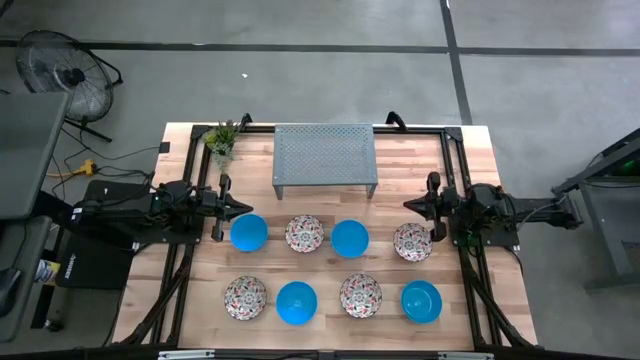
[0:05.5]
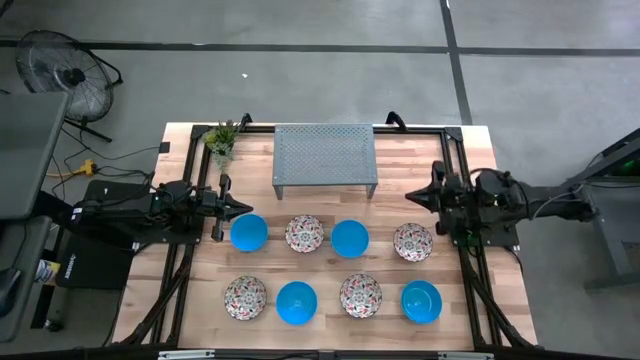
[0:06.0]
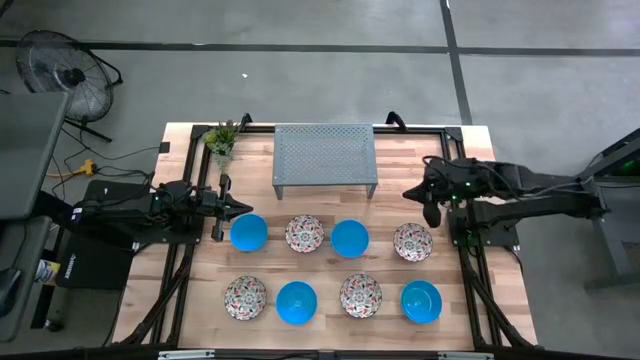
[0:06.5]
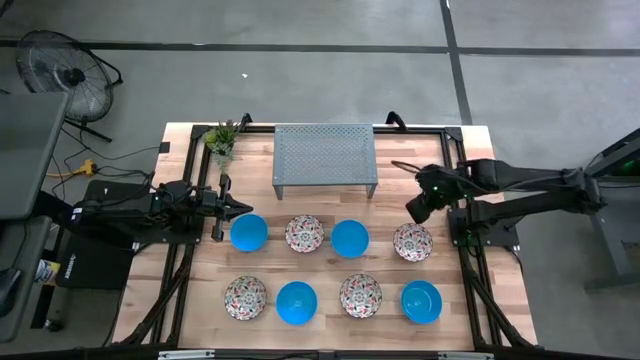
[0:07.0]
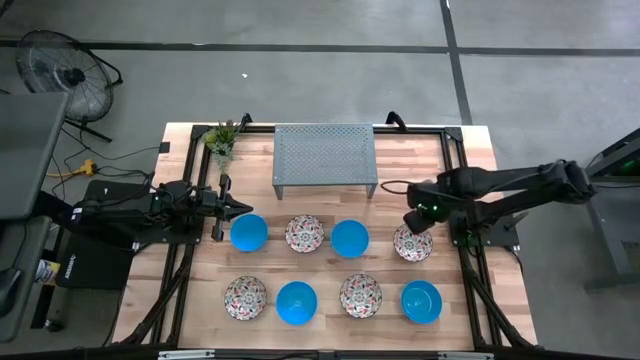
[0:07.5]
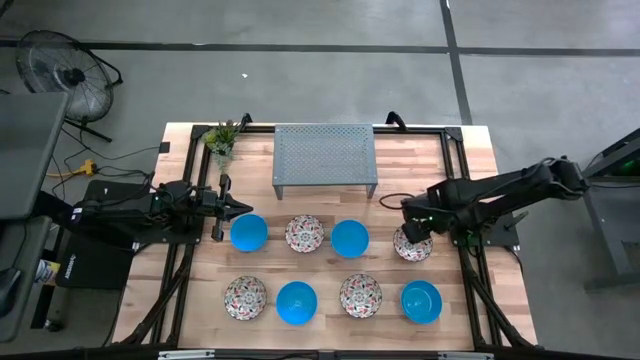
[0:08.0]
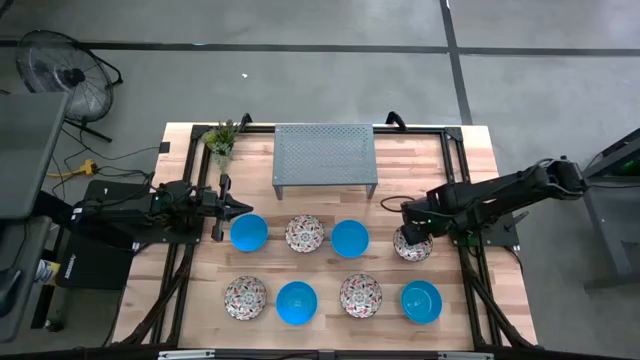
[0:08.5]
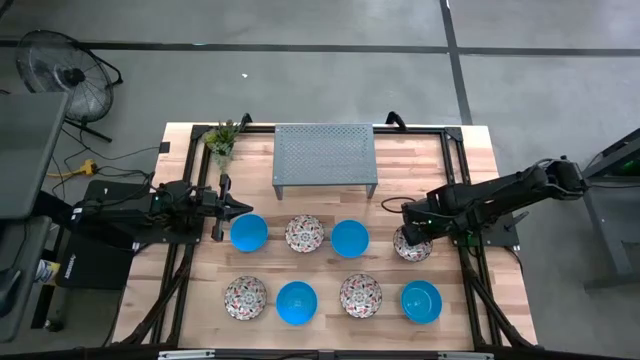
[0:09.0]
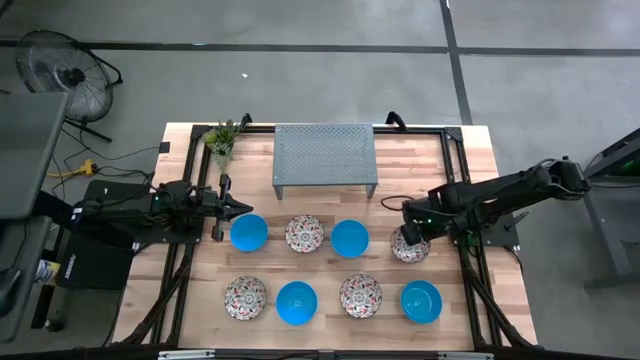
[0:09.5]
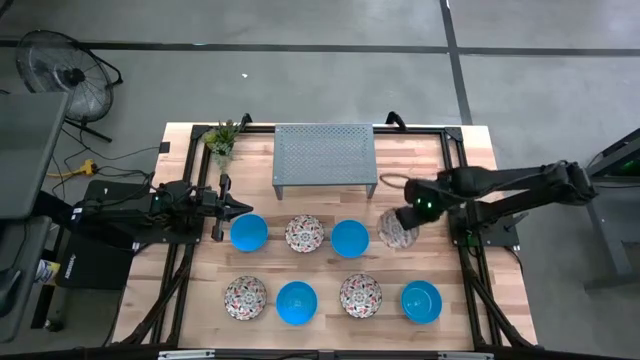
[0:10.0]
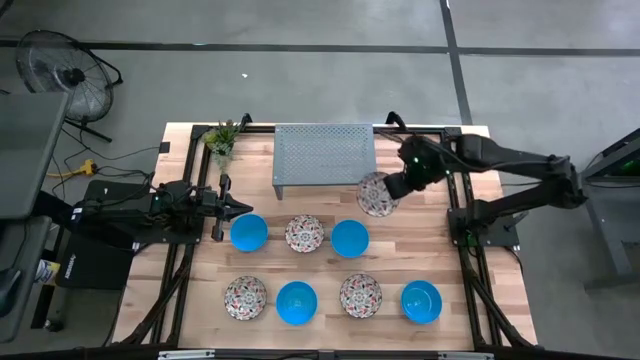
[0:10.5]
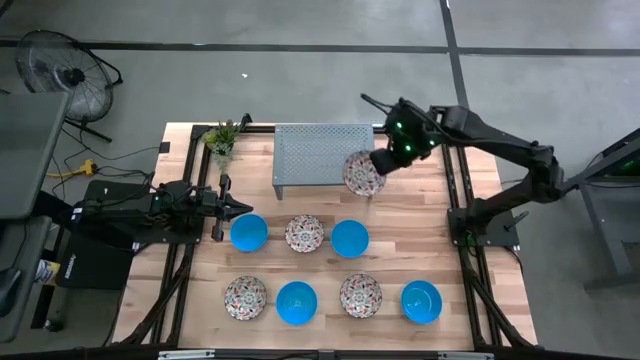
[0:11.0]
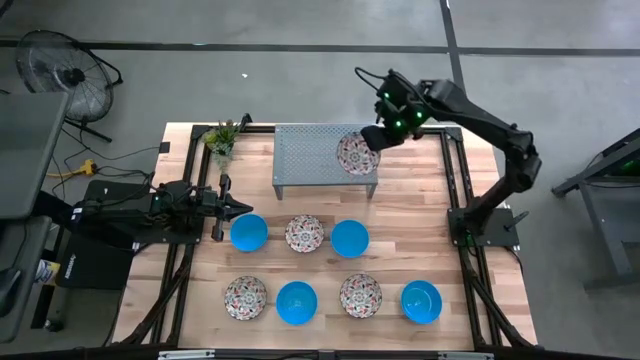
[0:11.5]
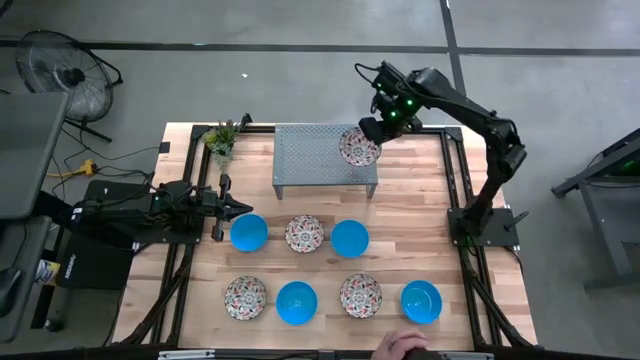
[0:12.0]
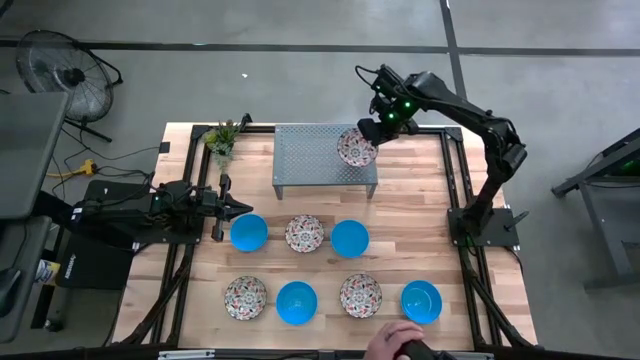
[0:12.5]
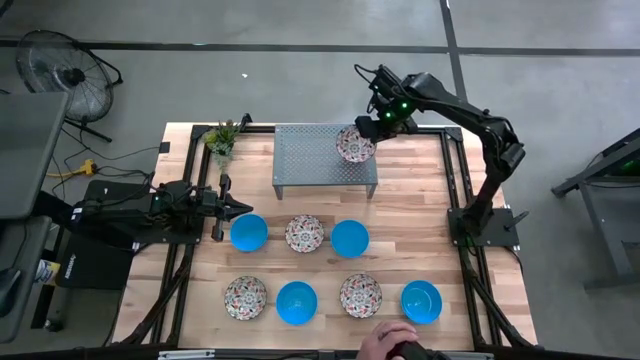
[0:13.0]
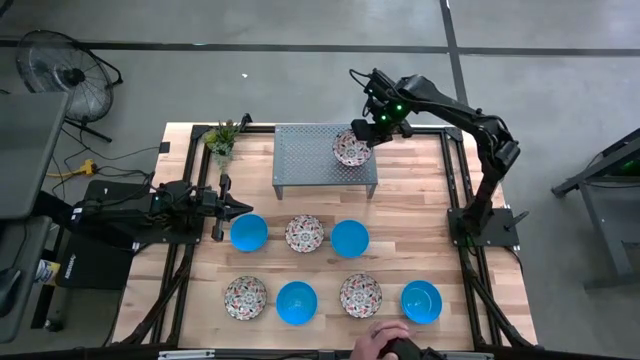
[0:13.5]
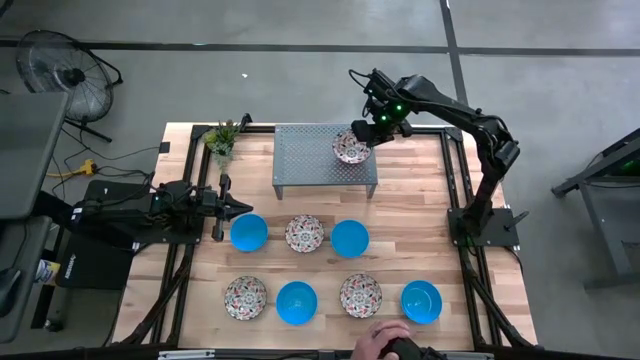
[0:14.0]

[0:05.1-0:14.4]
Task: Pick & Place Mini bowls
Put the white patterned bowl on the shelf

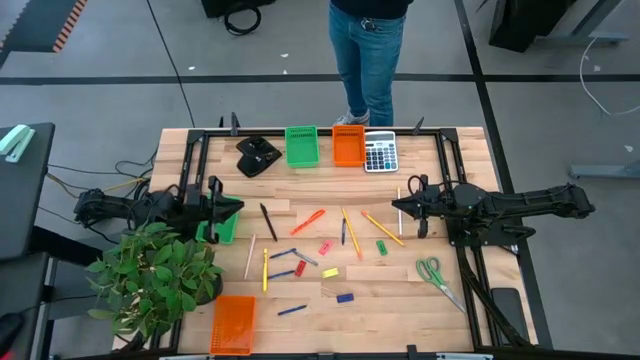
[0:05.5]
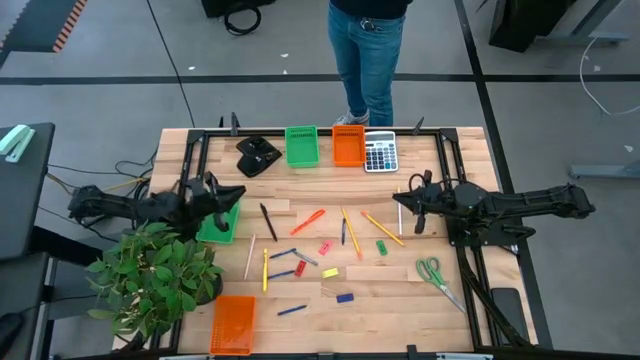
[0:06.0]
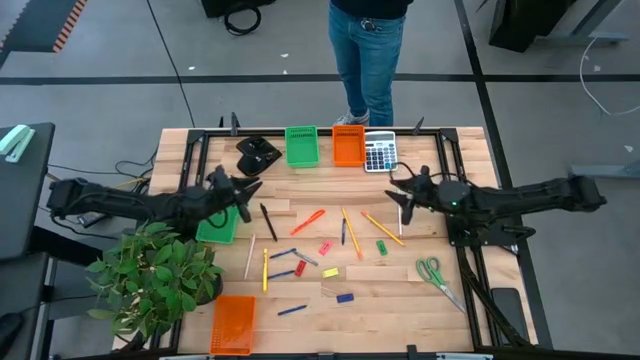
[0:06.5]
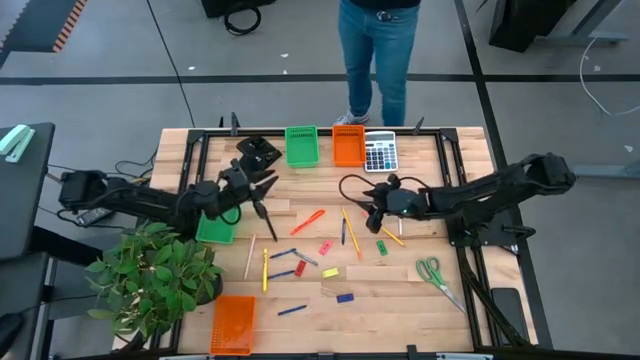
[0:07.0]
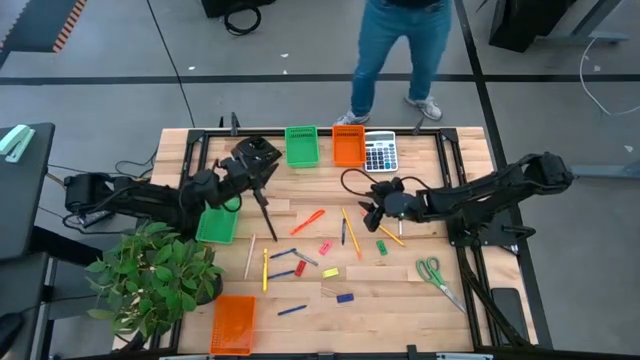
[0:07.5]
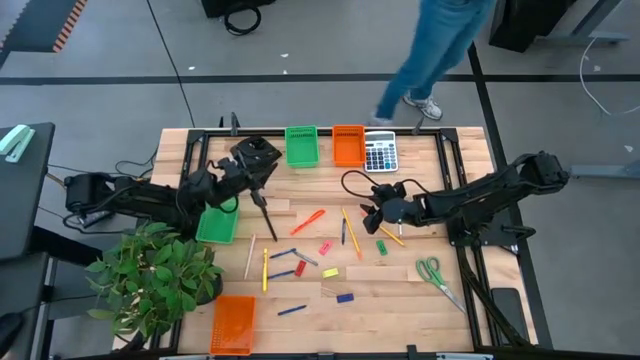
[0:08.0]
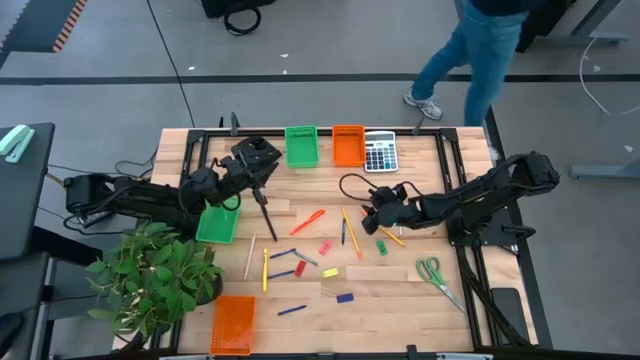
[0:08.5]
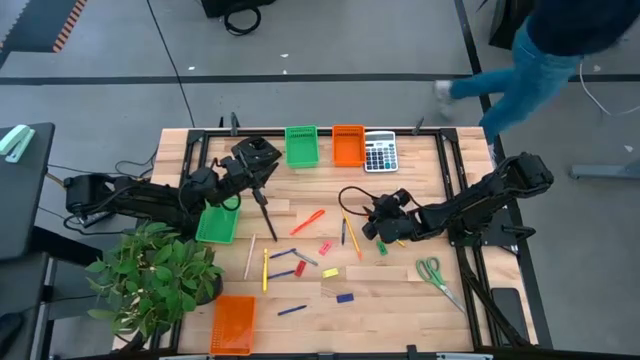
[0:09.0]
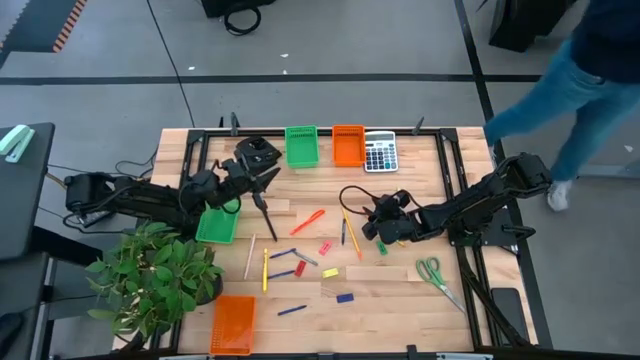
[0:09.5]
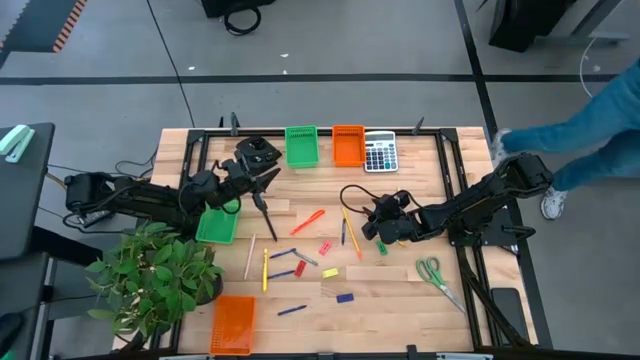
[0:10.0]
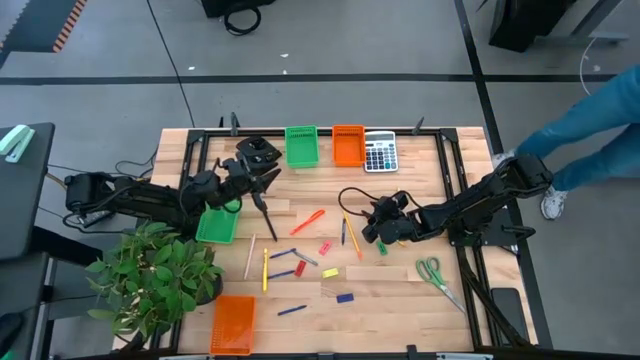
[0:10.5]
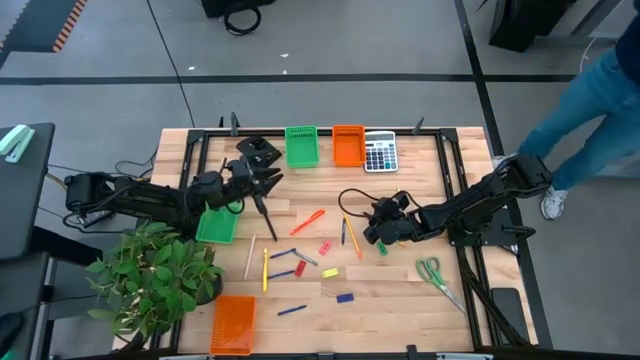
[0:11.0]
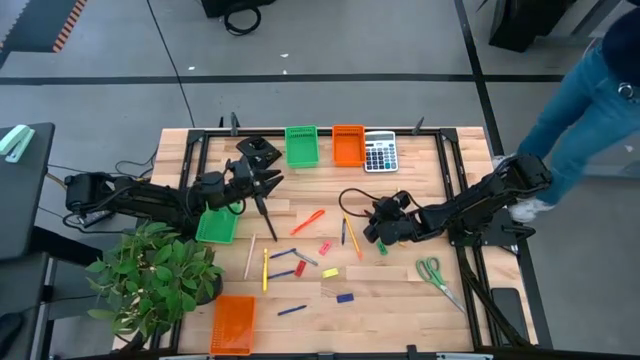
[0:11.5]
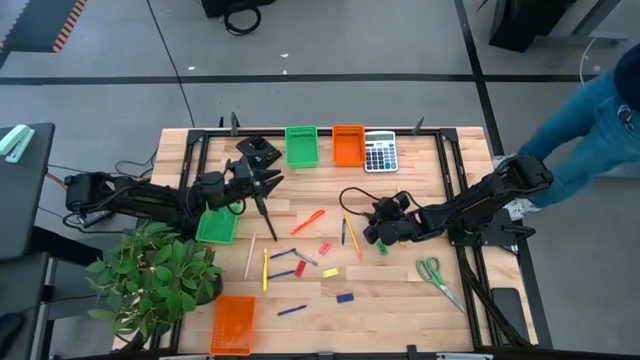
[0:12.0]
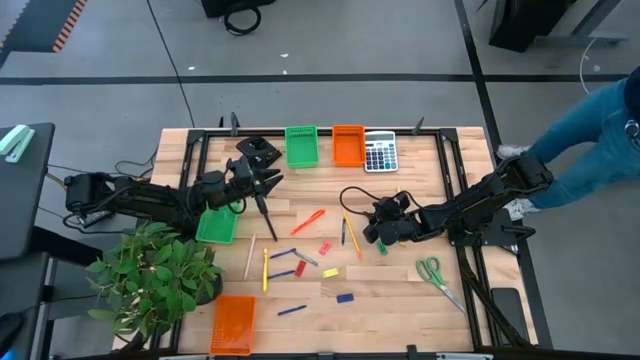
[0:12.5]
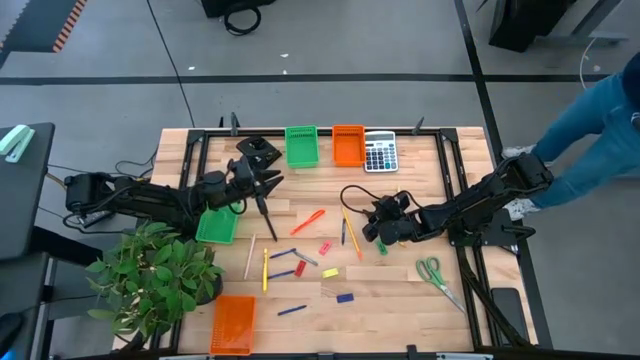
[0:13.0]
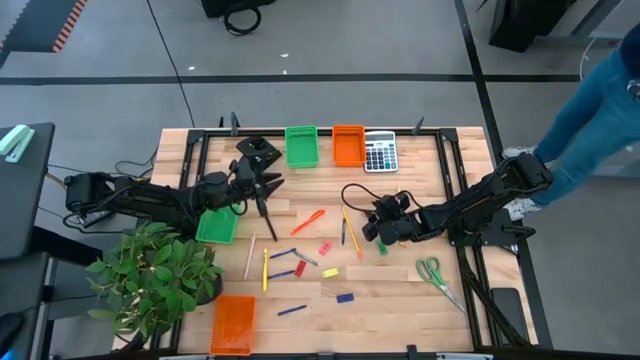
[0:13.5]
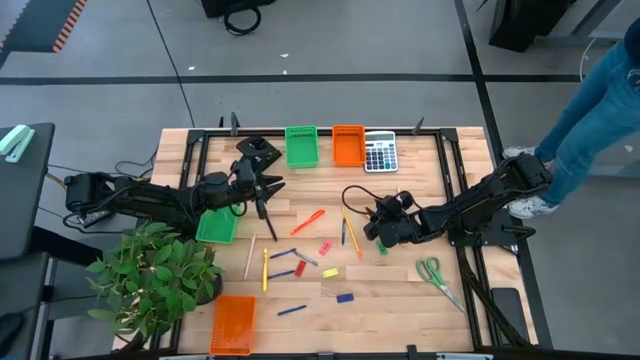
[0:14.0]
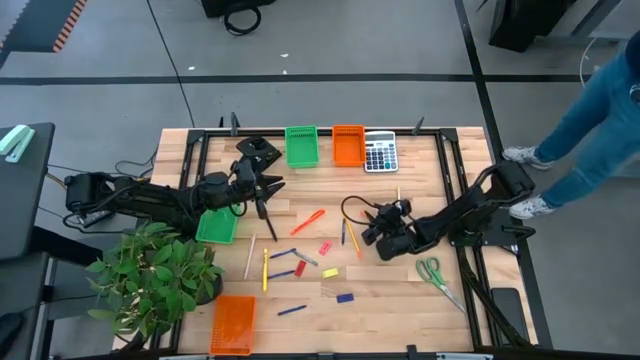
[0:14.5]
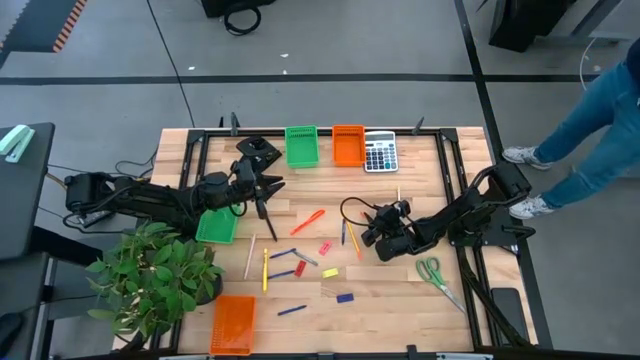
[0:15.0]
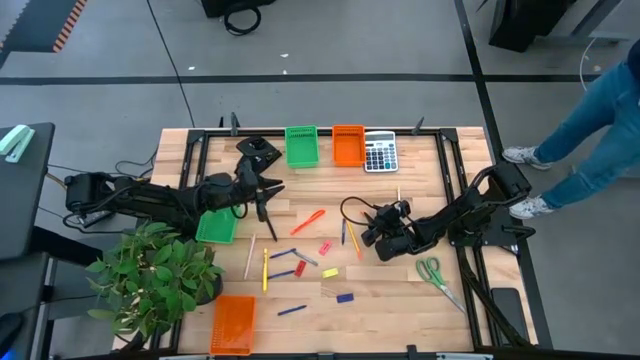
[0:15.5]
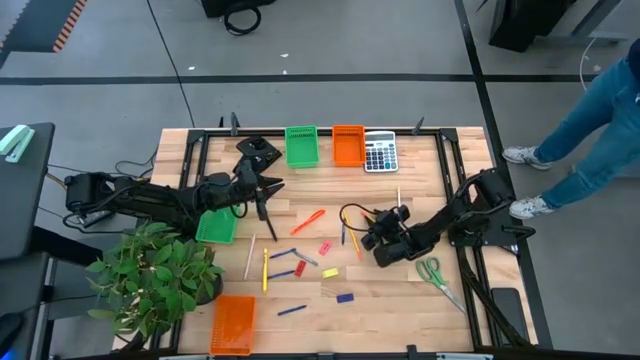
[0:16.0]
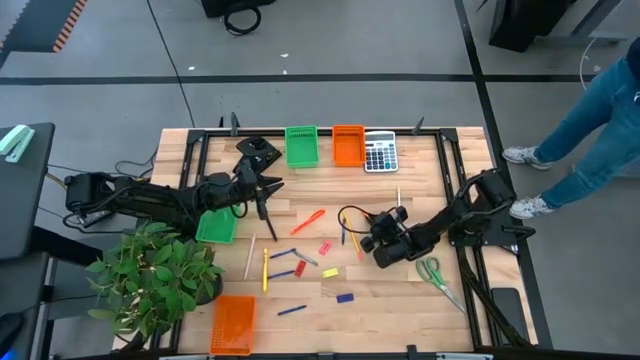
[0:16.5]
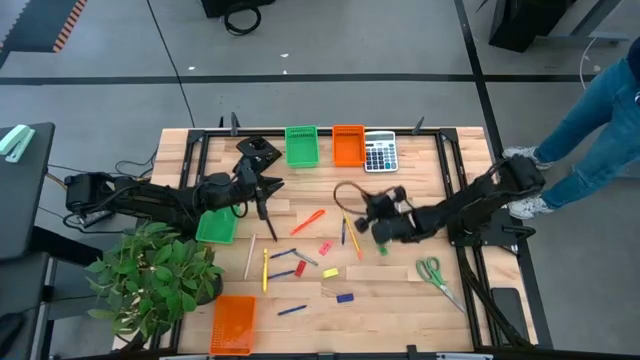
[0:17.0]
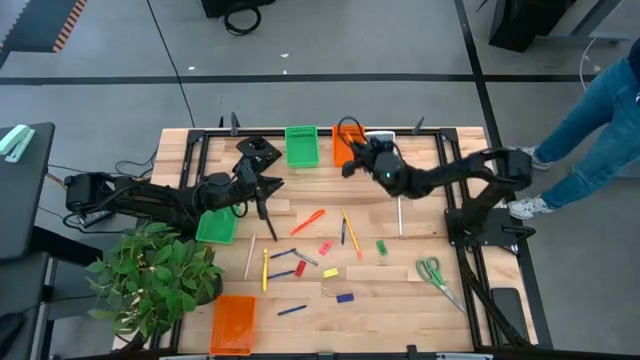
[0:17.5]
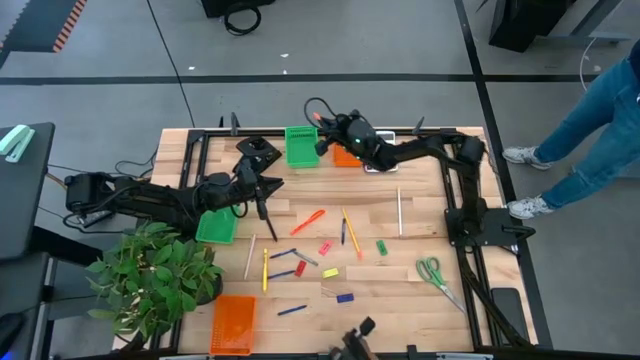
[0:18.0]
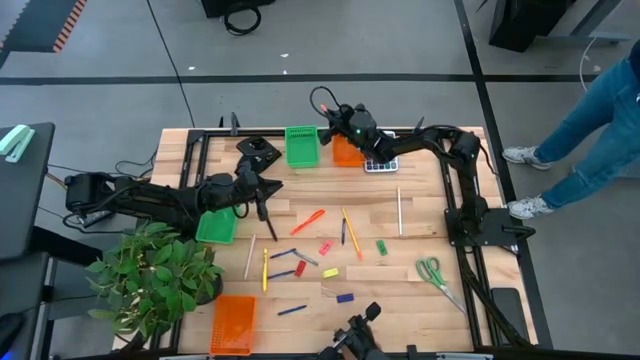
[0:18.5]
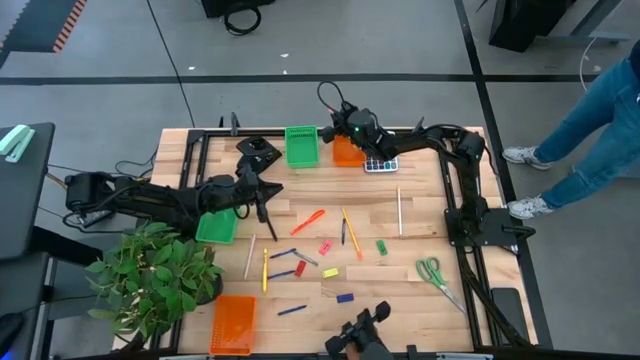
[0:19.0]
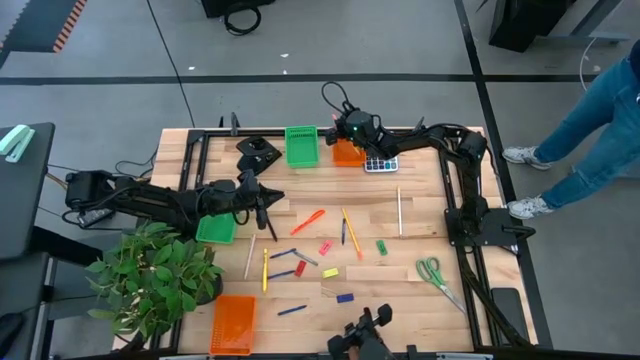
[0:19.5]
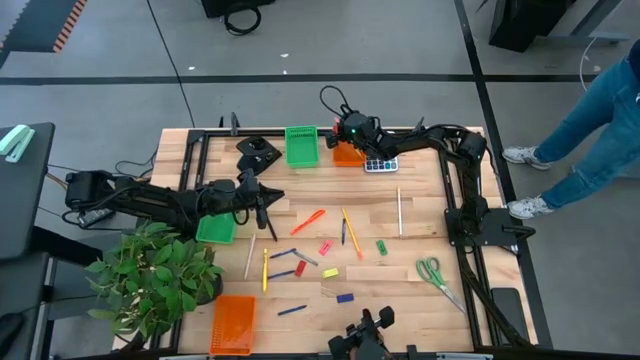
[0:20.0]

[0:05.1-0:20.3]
Task: Sort crayons/erasers/pens/pencils in bins
Put the yellow pencil into the top orange bin
